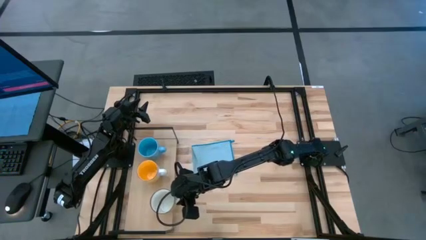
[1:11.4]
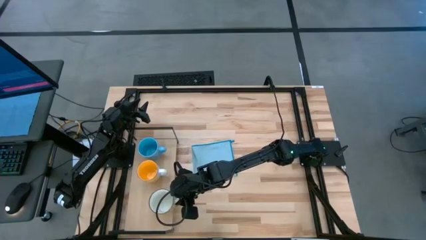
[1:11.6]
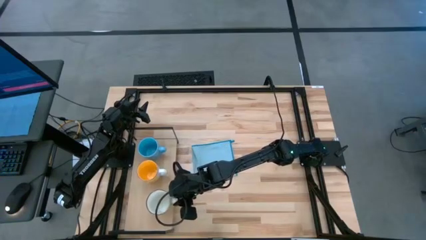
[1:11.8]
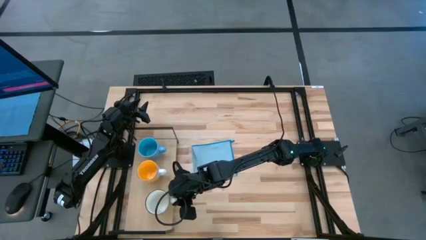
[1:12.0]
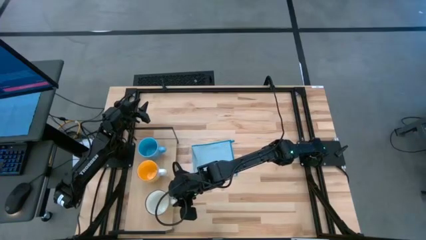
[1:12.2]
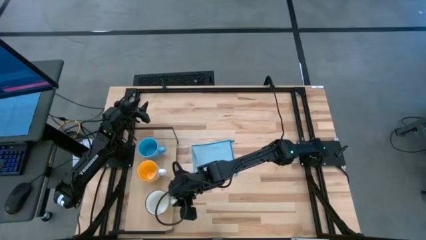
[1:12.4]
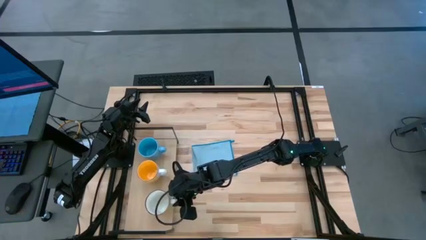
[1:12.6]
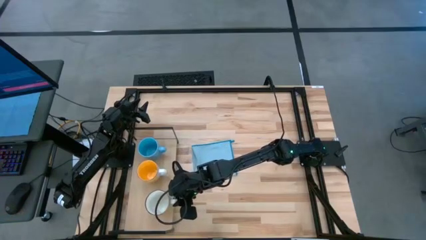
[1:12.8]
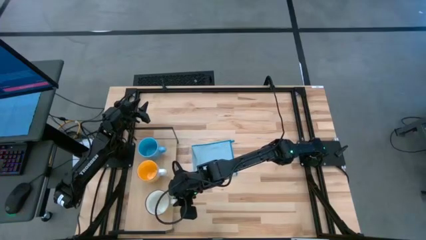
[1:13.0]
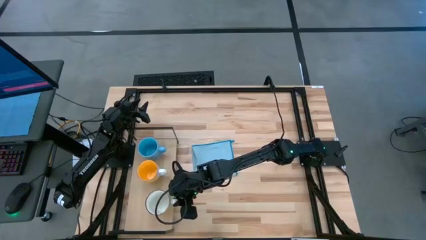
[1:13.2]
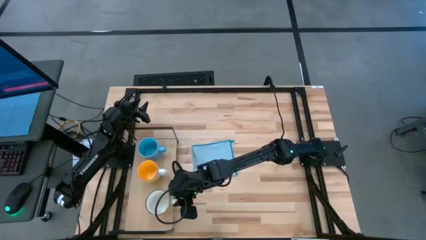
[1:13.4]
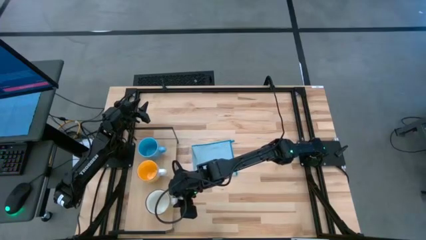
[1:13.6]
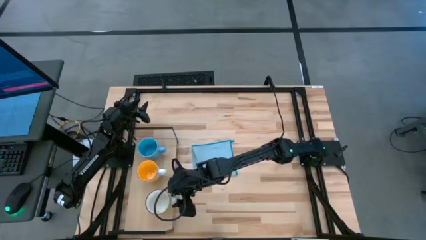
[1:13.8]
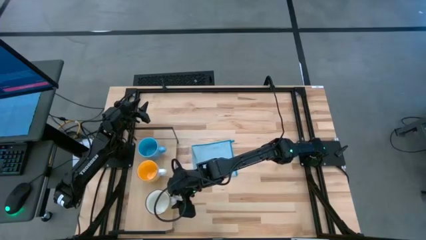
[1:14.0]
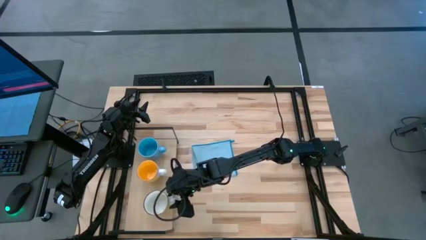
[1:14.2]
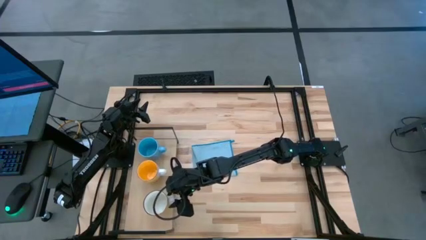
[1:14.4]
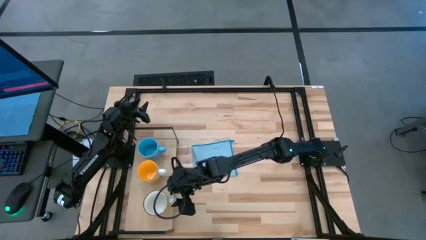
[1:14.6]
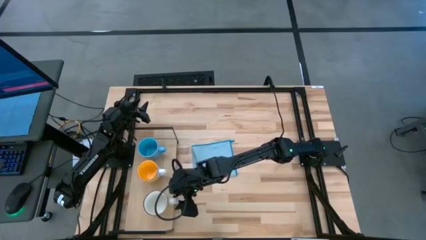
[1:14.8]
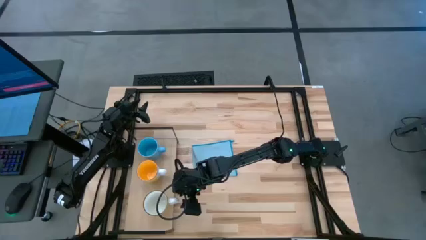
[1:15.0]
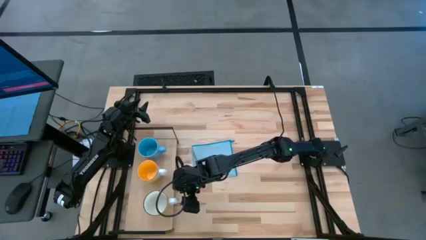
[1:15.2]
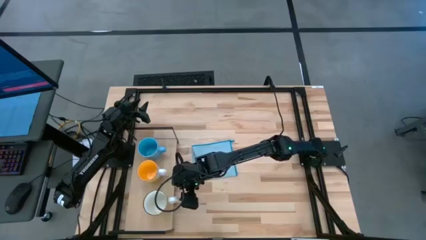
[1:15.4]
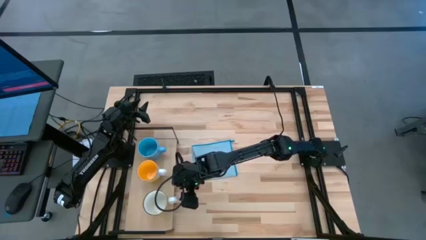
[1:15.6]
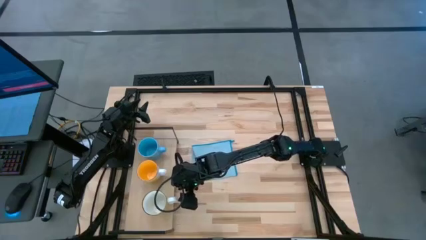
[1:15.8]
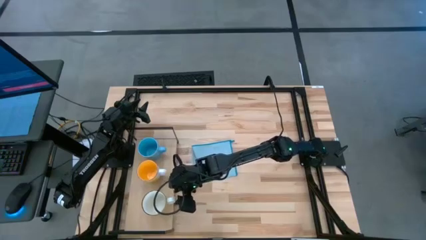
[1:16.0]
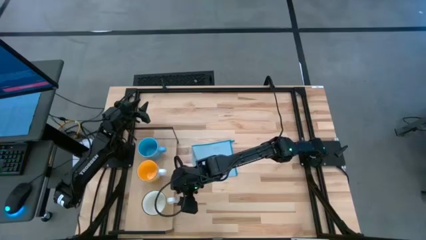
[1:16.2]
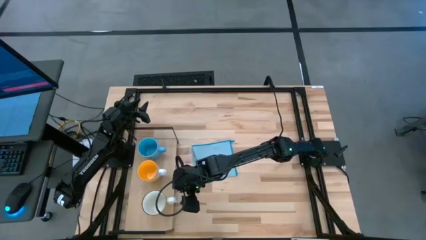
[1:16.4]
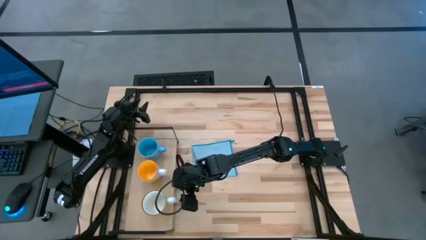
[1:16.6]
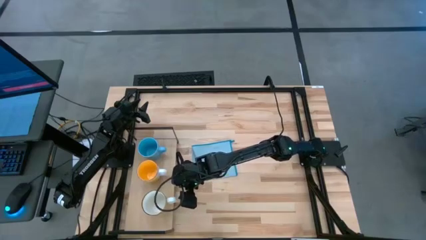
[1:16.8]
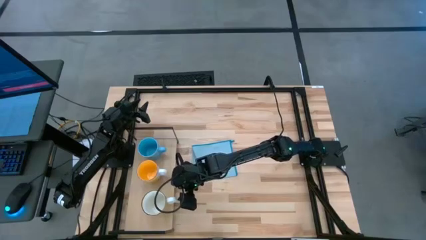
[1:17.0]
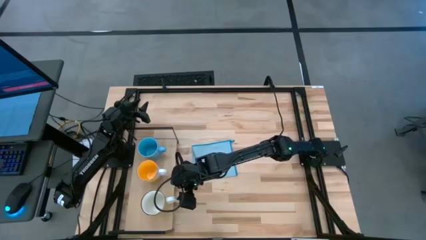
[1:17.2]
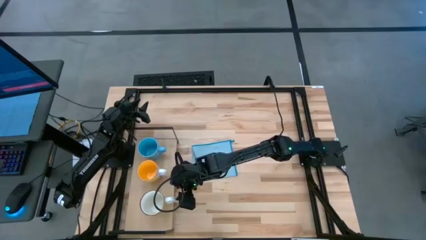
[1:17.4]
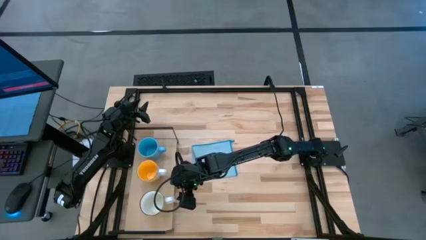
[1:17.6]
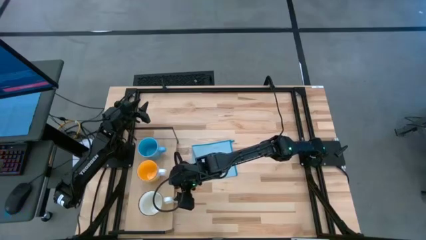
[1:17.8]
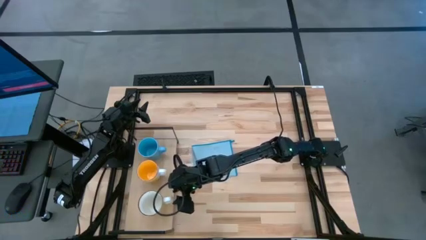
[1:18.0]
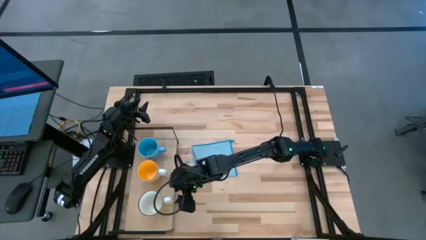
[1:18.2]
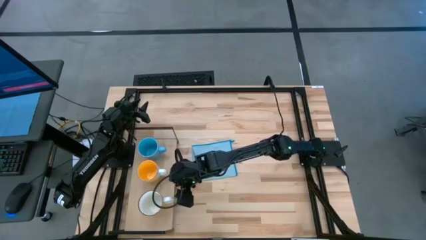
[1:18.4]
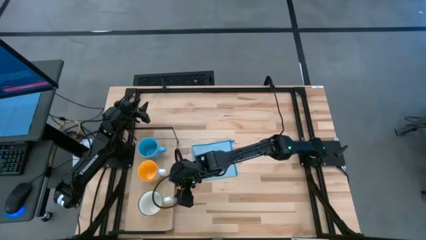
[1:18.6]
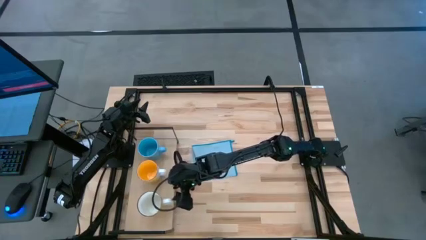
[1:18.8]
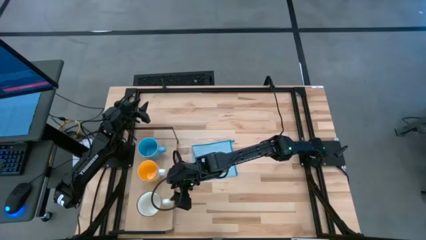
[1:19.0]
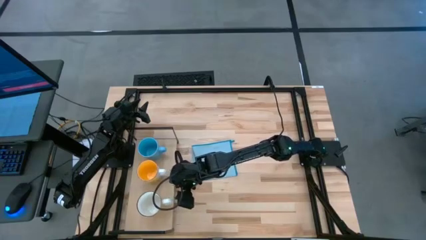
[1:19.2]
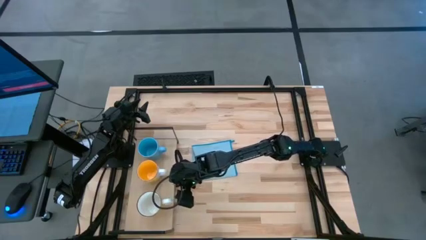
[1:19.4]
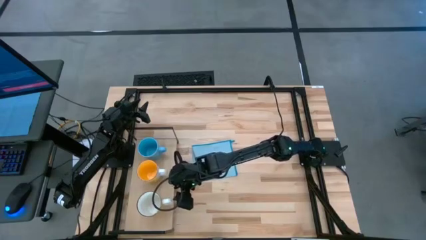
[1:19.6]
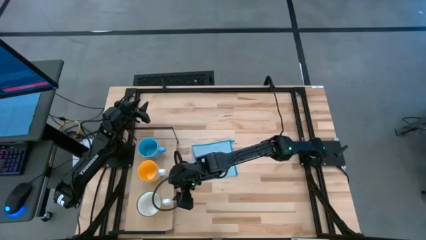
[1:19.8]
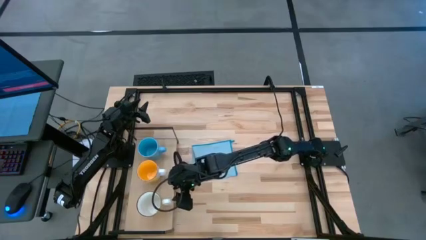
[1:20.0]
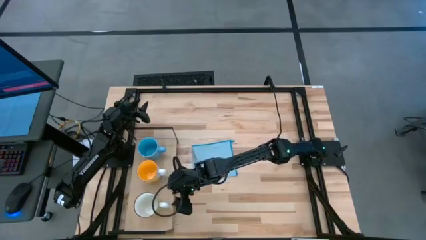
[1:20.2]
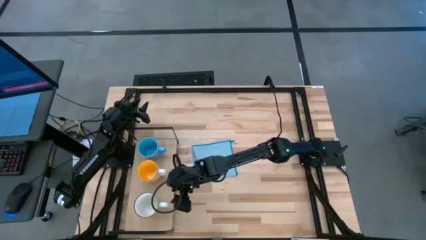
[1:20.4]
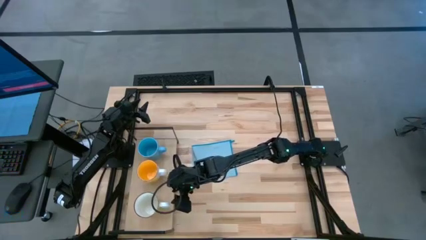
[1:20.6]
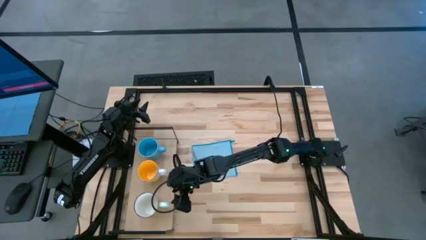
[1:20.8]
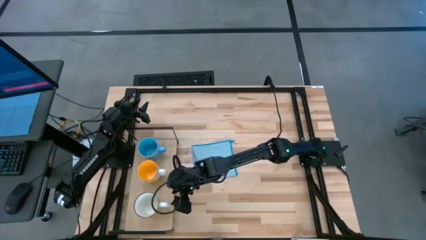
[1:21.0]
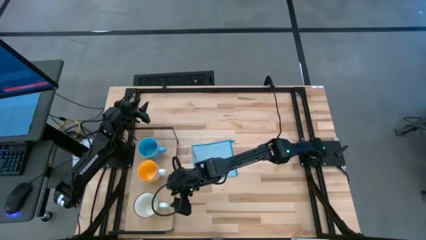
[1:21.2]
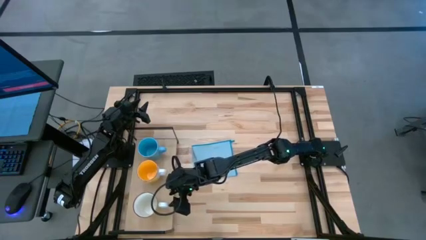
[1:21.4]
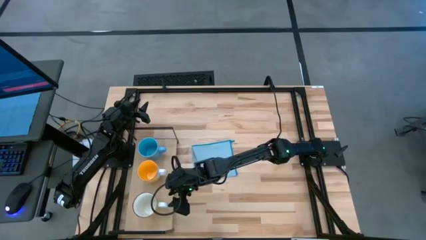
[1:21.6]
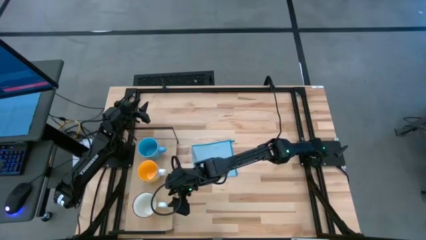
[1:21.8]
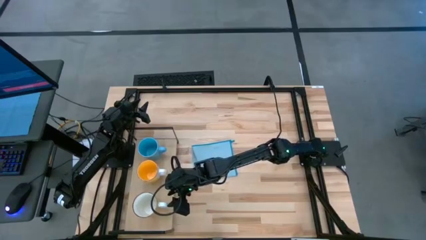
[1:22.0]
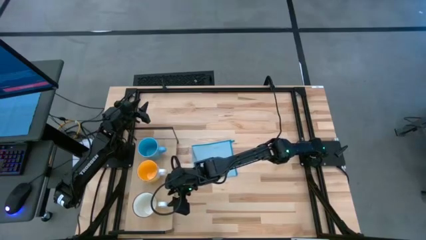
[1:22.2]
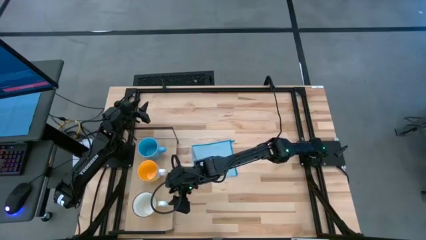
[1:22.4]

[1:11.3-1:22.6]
Task: Stack small to large cups/mugs on shelf
Put the white and yellow mug on the shelf
